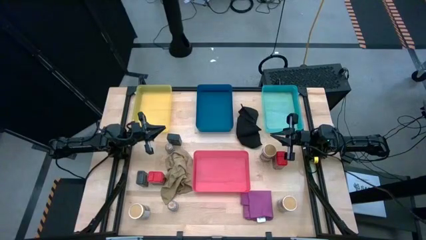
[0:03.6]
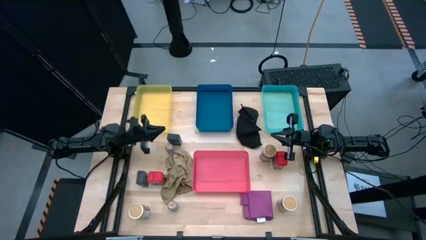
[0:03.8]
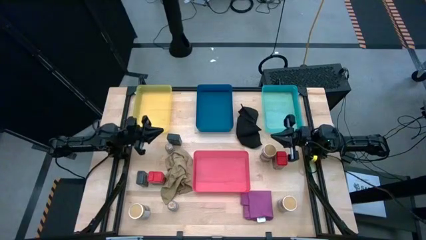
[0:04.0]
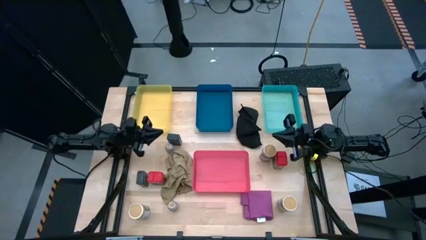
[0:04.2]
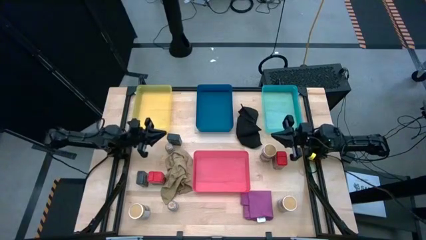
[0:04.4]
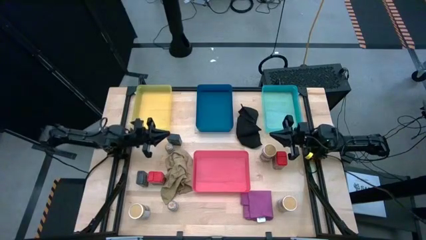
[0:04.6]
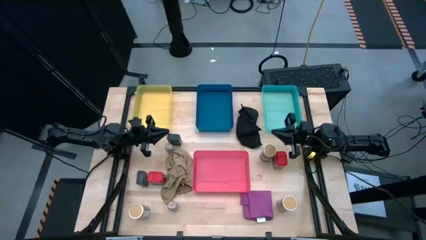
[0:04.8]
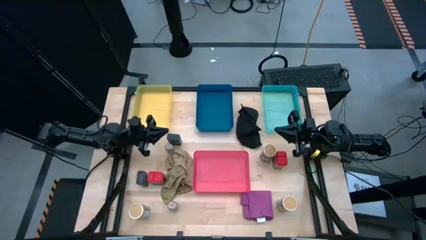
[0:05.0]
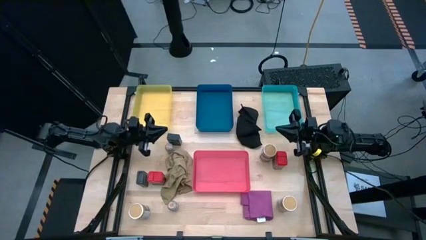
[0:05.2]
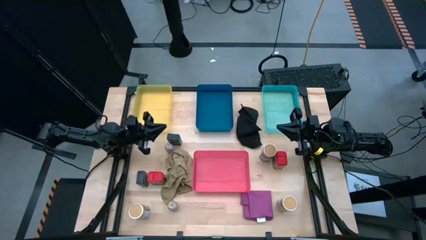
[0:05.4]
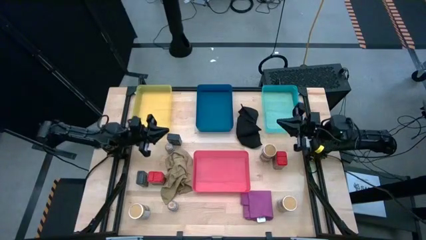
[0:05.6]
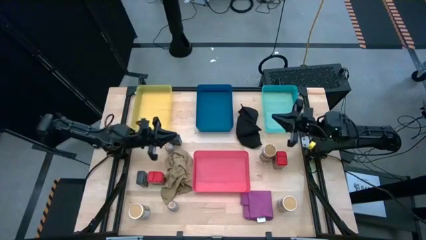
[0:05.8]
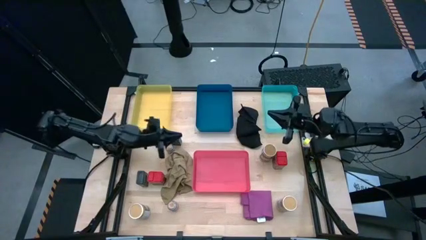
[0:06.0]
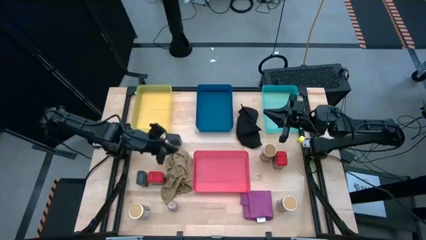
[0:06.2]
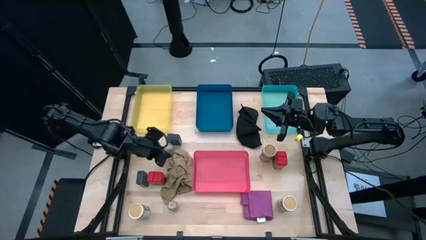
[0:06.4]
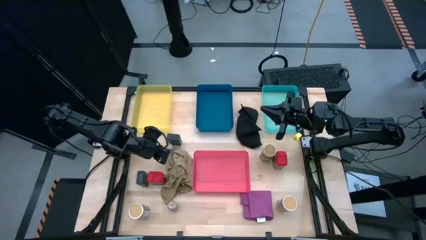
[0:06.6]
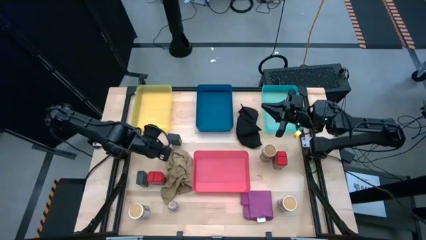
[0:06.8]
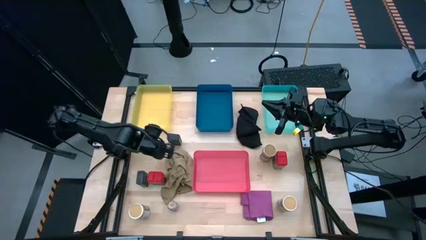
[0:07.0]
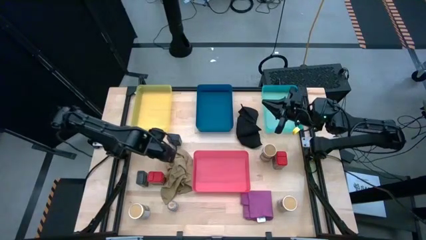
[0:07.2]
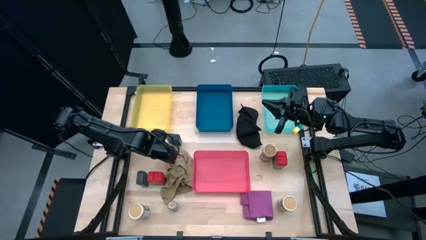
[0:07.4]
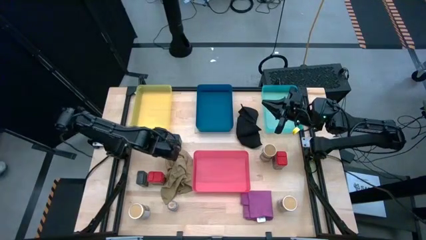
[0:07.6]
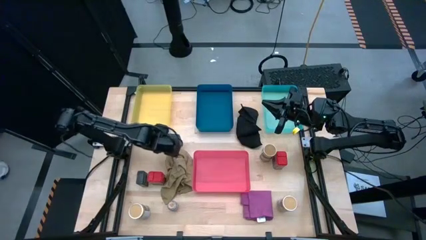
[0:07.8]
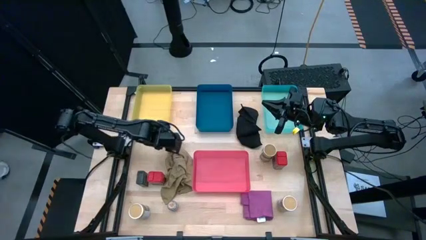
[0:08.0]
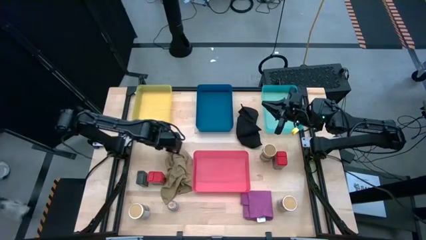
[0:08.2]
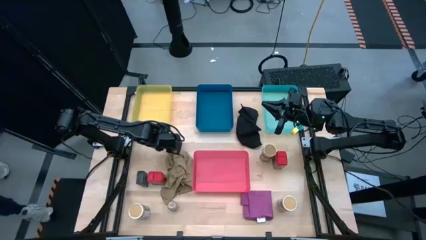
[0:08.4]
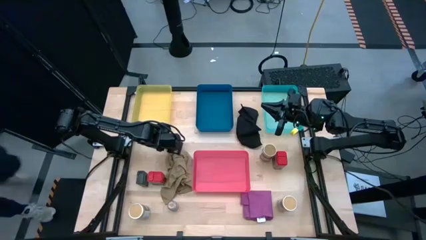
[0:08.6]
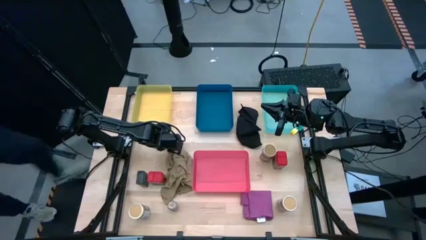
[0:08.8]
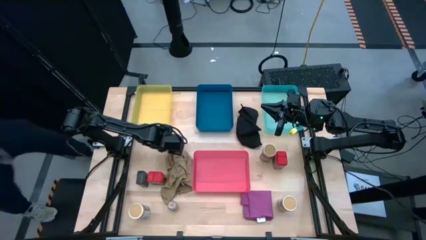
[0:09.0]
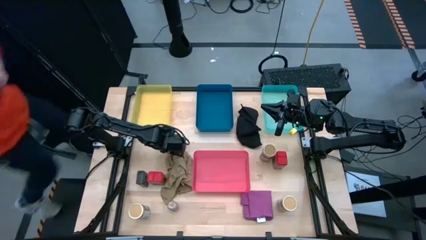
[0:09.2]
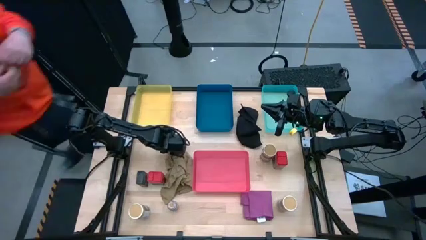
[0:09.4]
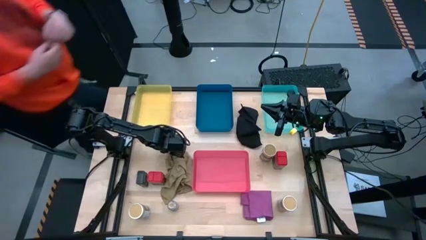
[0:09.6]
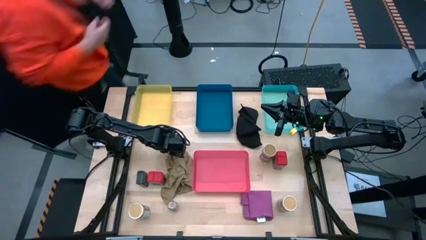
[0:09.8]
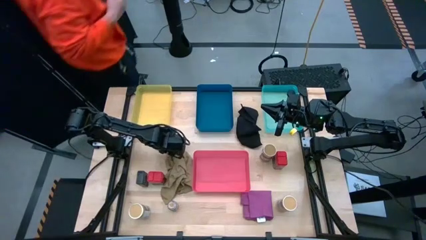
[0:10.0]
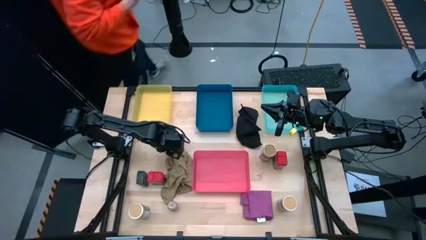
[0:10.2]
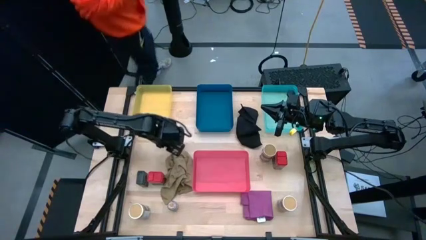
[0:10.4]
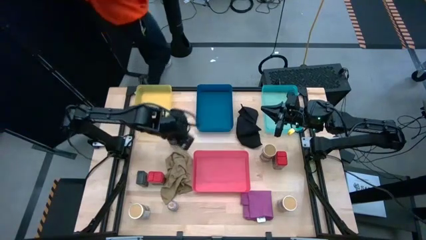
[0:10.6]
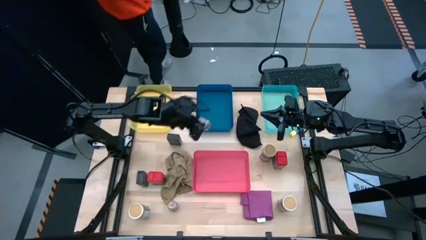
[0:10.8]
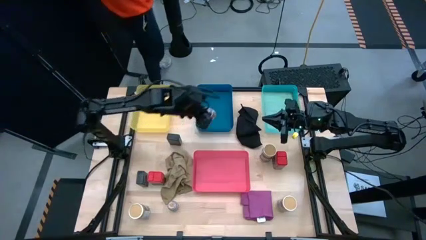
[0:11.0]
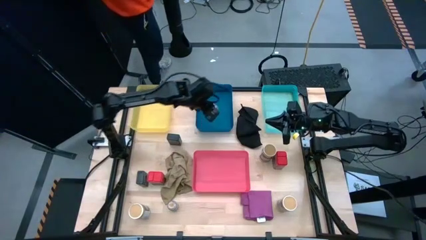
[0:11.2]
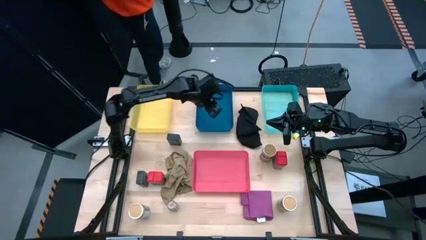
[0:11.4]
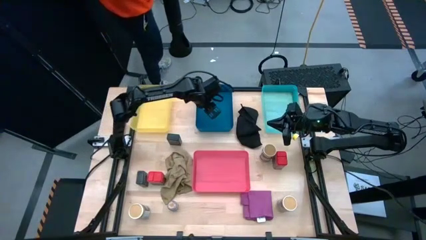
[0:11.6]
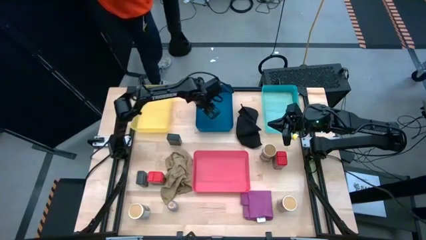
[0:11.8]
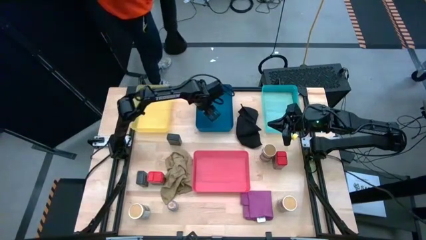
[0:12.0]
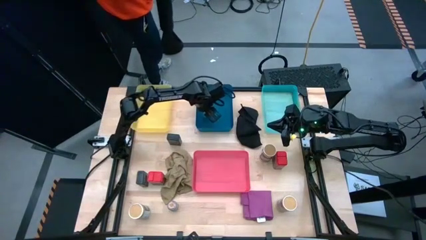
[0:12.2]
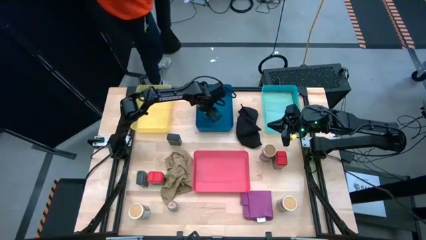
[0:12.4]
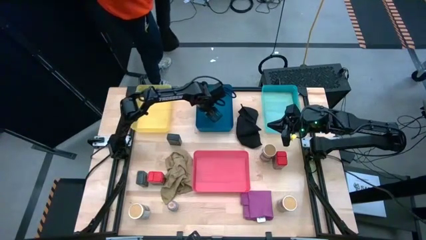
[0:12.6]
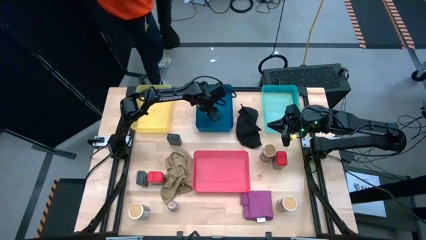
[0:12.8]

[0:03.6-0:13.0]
Task: Sort spices by type
Put the top brown seasoning bottle into the blue bin

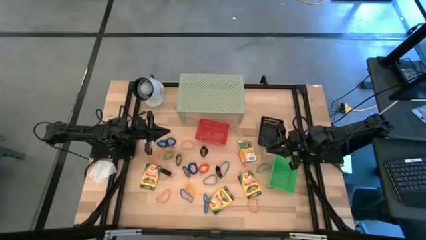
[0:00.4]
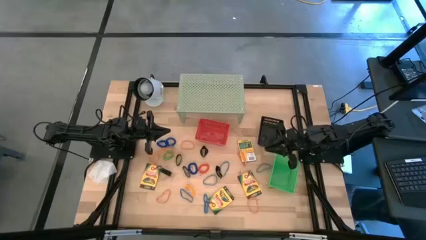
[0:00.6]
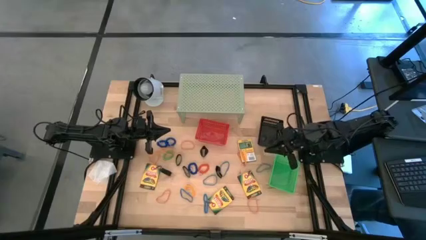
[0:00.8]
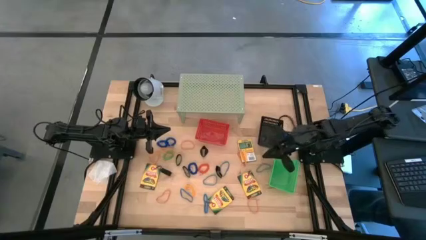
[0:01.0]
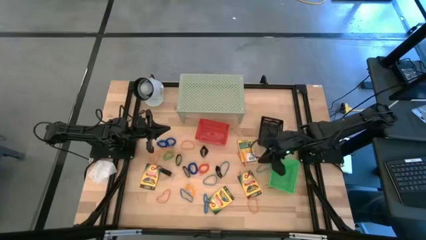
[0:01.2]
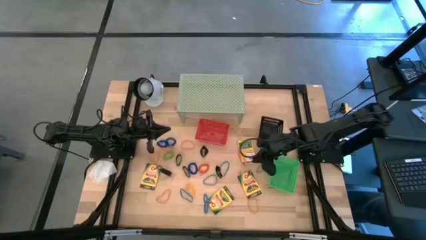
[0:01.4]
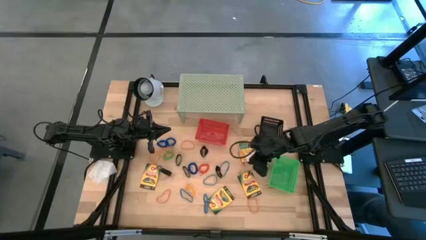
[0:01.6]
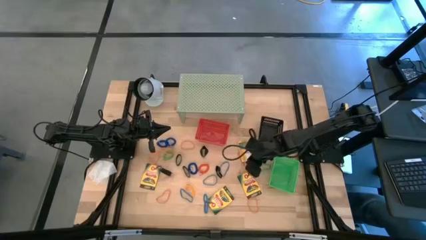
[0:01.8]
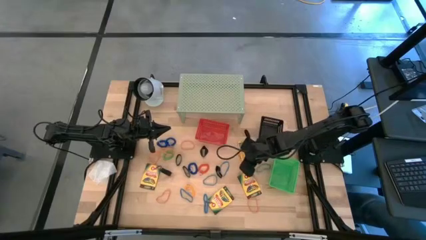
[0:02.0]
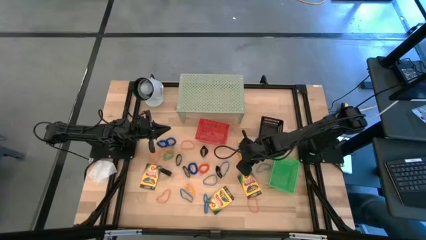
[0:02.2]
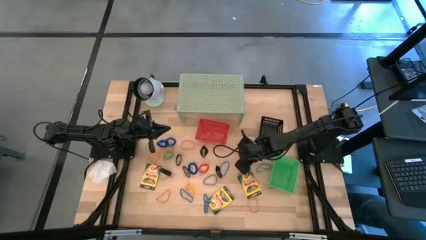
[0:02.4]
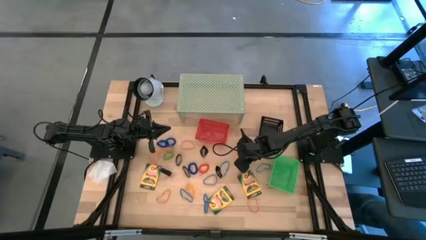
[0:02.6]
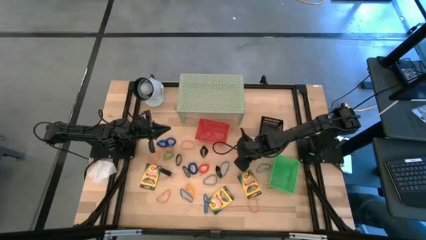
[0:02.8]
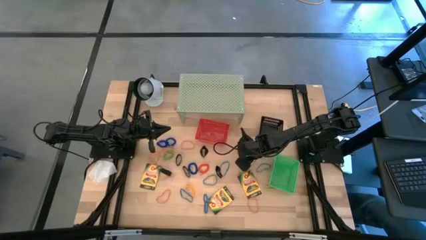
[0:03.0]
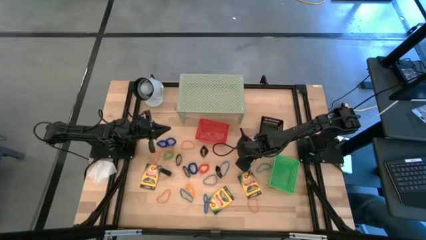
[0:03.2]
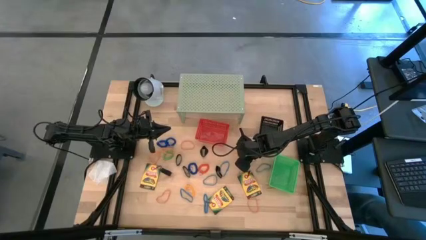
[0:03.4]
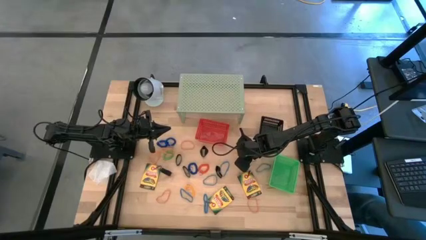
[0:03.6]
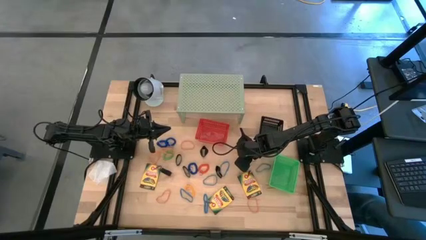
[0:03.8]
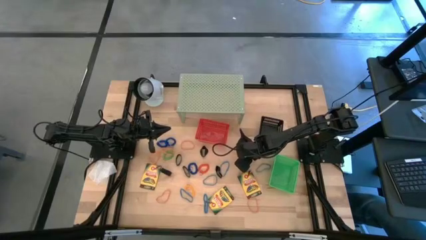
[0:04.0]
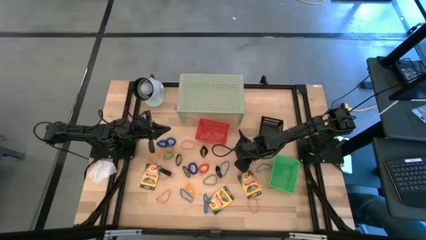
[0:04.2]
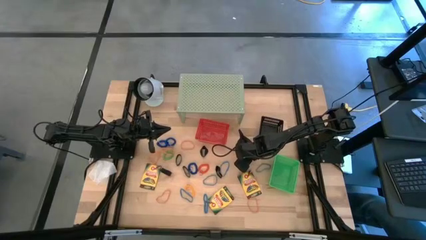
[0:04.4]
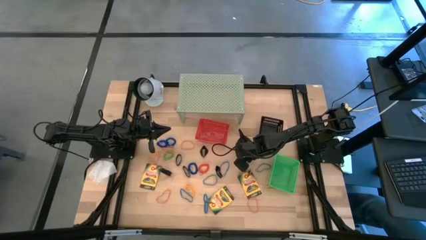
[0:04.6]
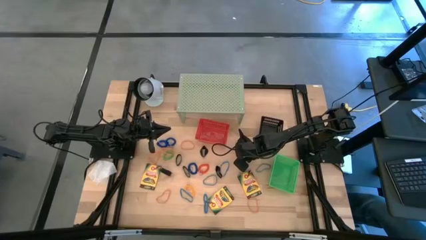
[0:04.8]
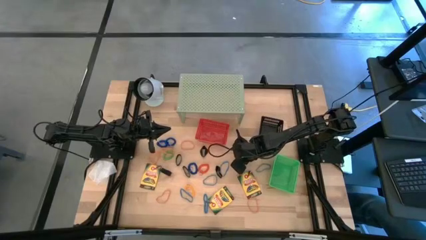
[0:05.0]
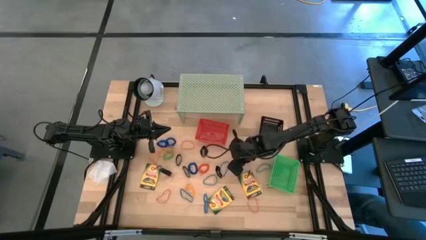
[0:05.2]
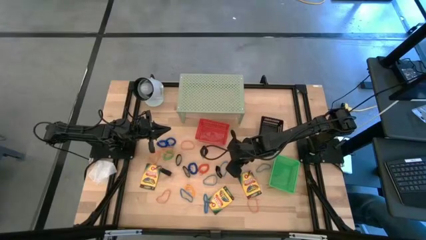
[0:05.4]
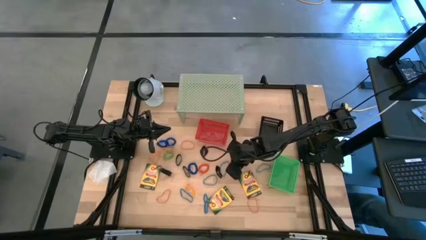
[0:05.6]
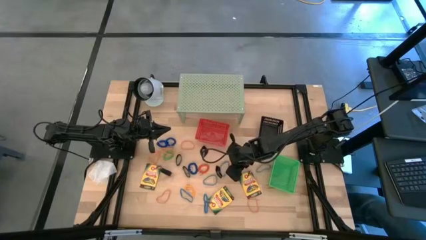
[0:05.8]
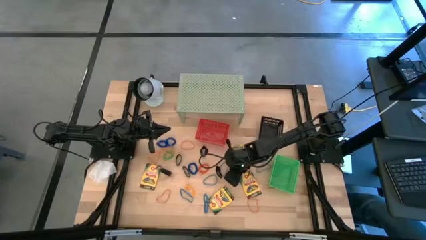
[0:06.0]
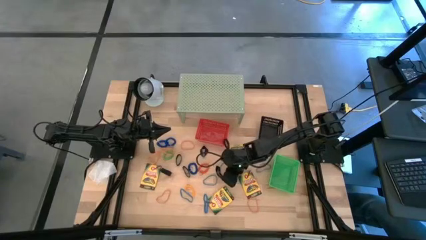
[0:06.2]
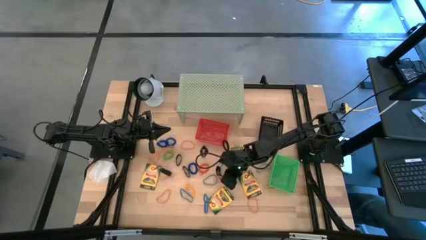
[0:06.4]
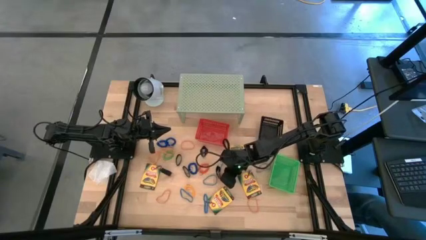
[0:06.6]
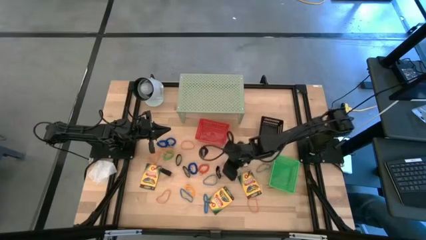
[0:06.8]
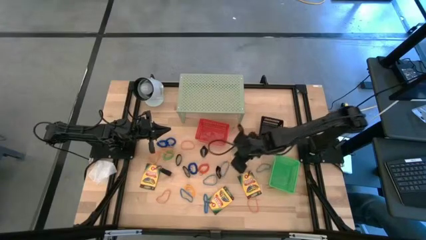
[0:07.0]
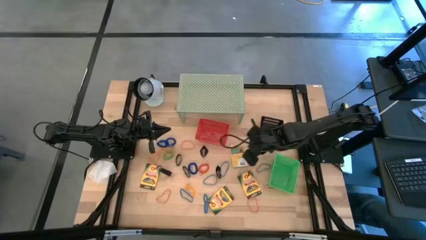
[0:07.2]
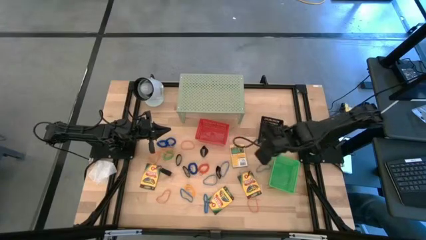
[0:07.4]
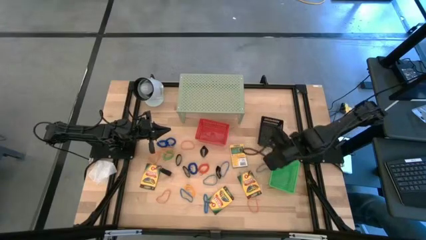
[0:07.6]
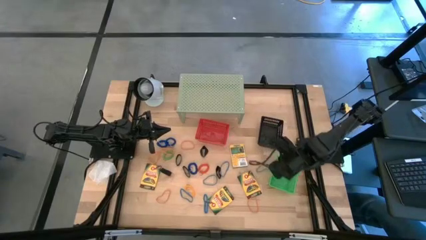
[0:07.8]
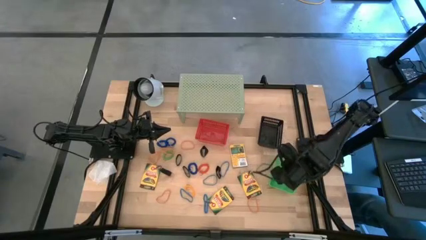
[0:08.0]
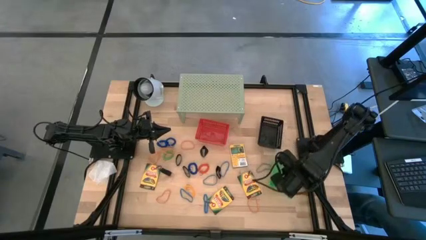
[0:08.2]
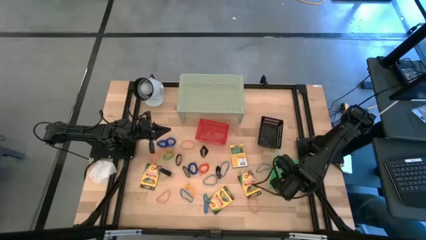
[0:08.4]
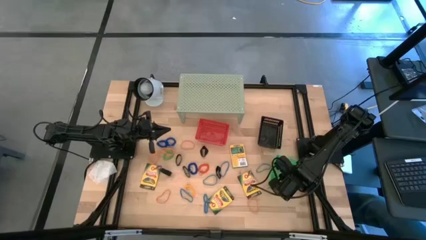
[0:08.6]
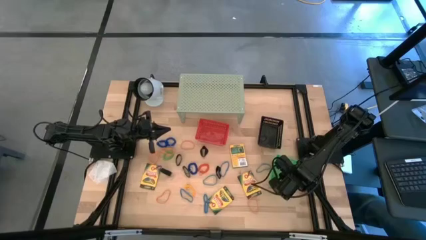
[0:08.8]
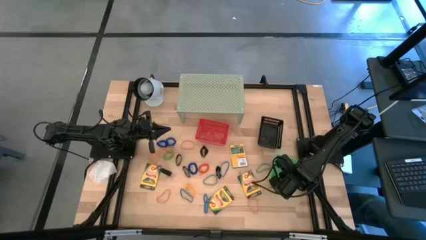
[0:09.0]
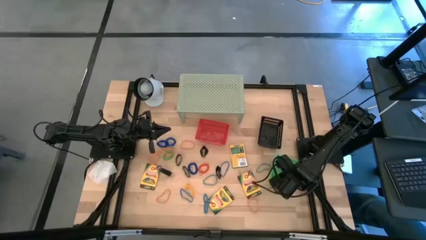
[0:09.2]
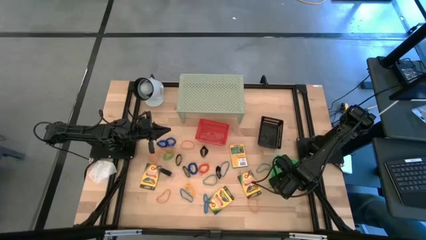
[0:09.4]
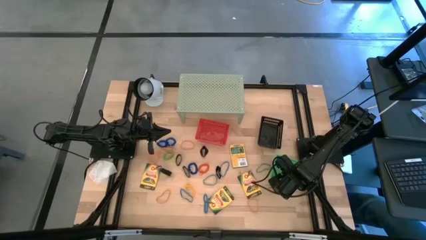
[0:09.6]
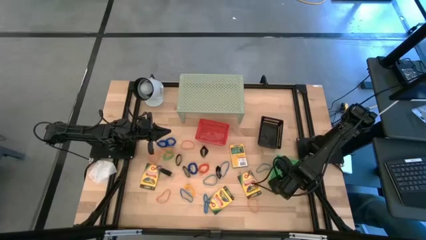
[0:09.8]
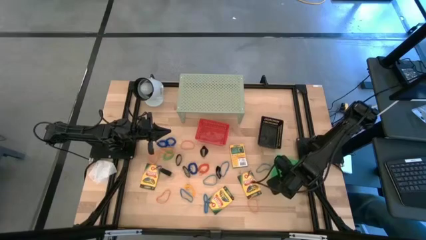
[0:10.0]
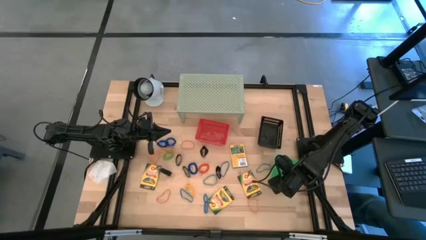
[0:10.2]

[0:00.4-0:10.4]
Task: Pick & Place Office Desk Supplies
Put the orange rubber band into the green bin
